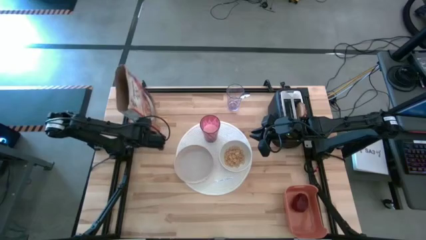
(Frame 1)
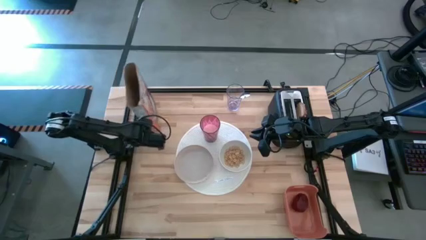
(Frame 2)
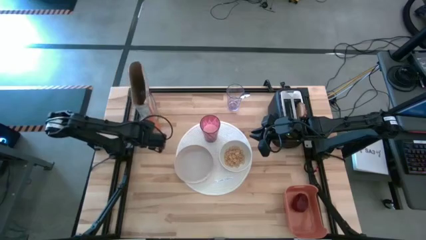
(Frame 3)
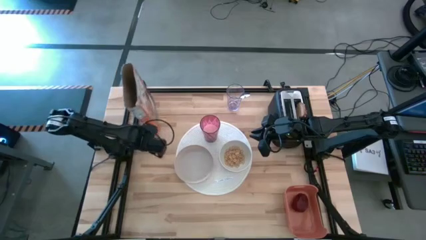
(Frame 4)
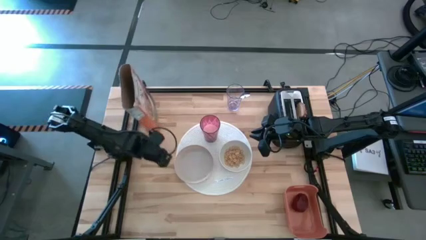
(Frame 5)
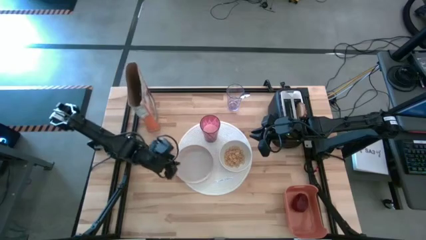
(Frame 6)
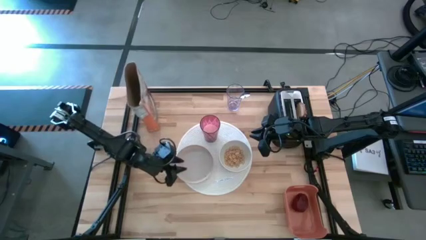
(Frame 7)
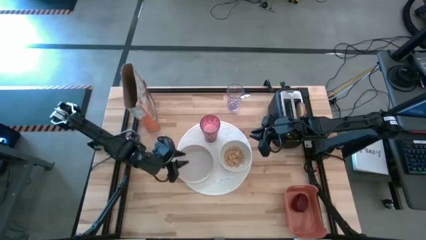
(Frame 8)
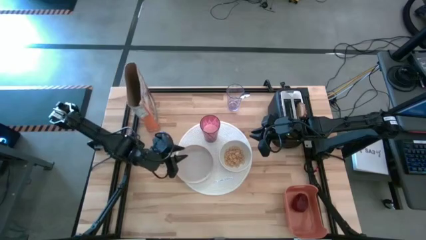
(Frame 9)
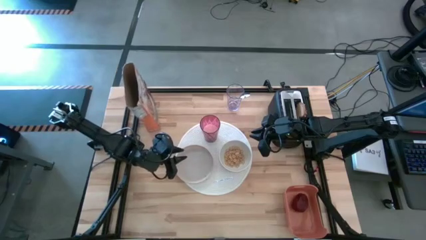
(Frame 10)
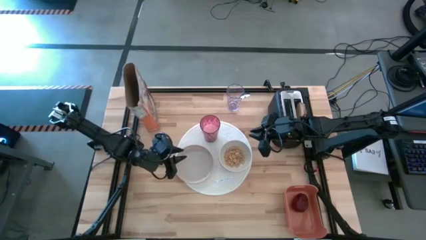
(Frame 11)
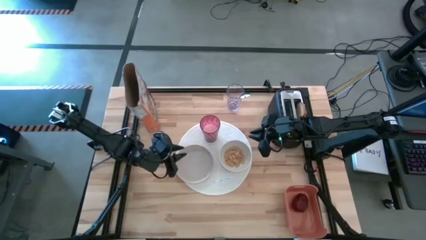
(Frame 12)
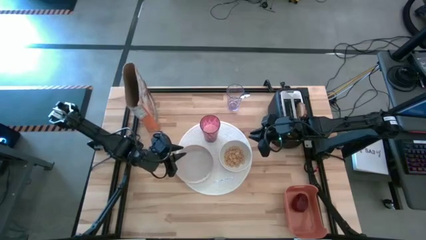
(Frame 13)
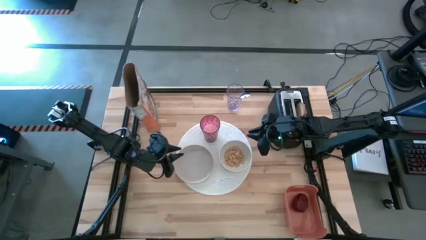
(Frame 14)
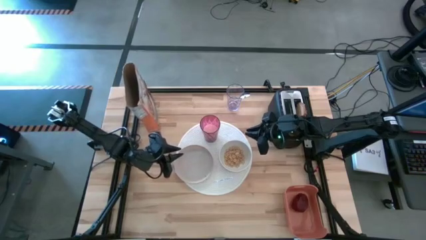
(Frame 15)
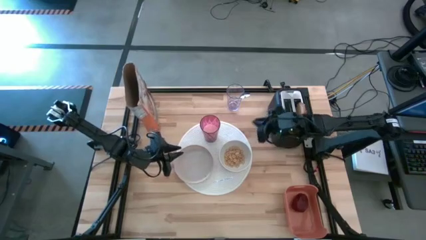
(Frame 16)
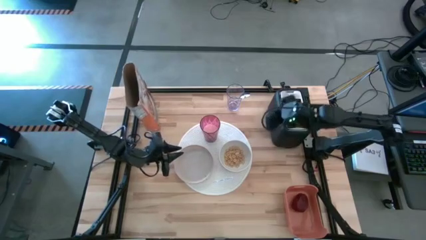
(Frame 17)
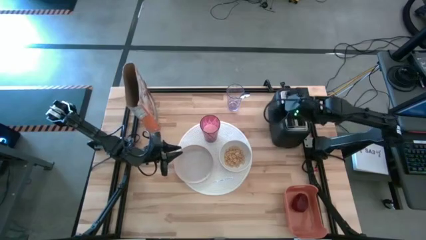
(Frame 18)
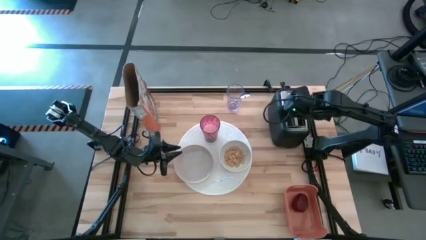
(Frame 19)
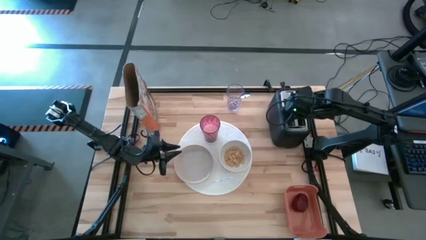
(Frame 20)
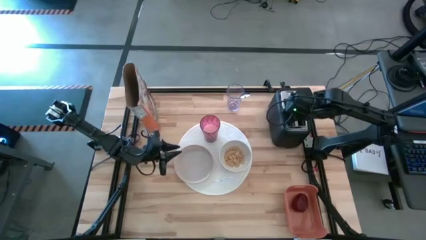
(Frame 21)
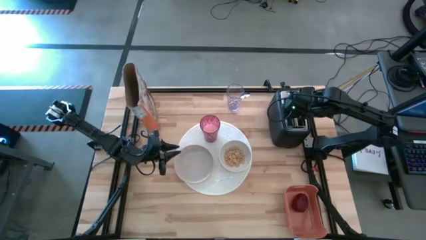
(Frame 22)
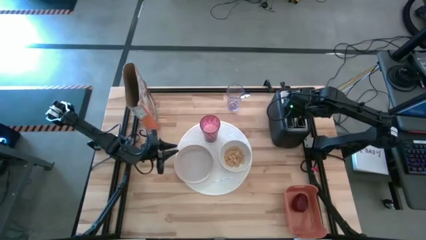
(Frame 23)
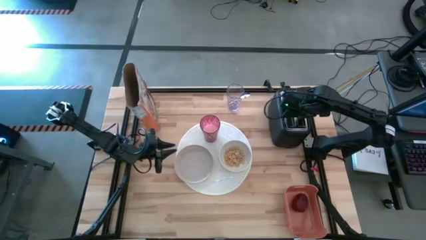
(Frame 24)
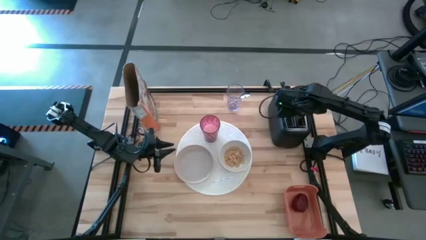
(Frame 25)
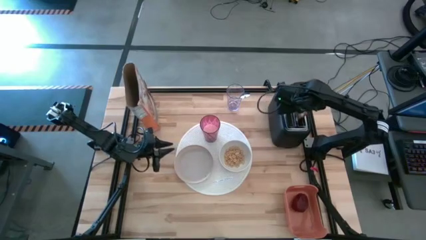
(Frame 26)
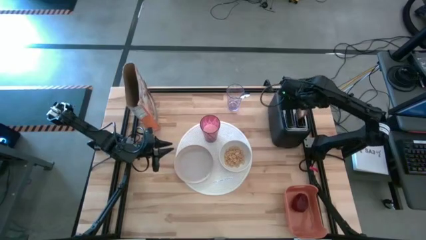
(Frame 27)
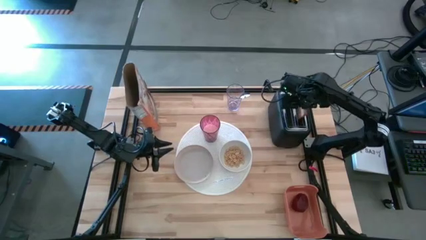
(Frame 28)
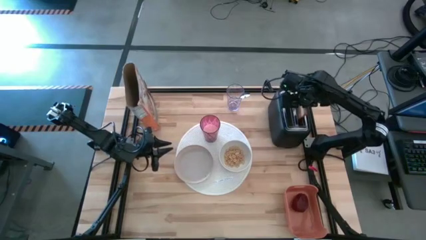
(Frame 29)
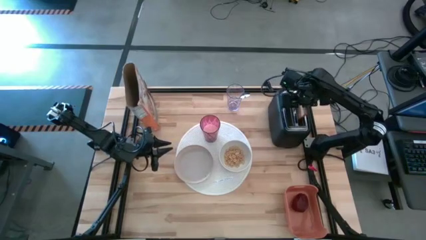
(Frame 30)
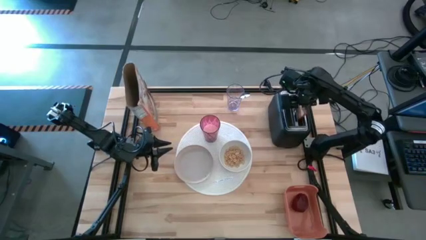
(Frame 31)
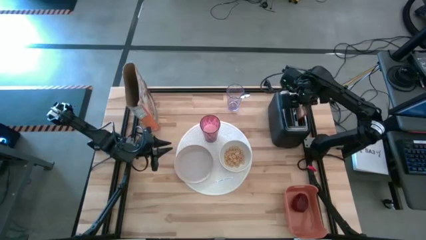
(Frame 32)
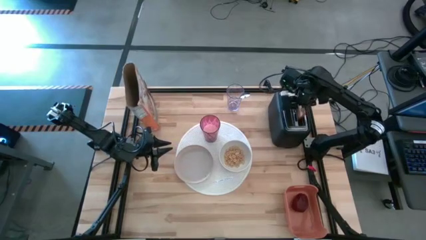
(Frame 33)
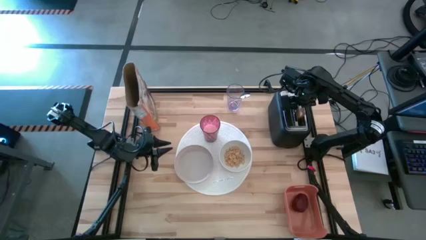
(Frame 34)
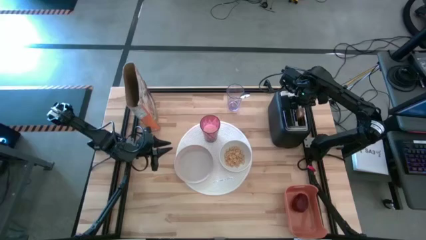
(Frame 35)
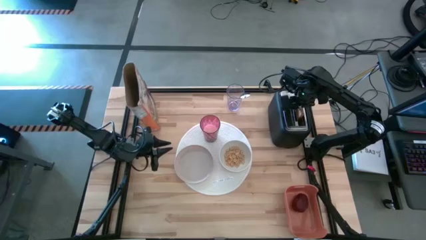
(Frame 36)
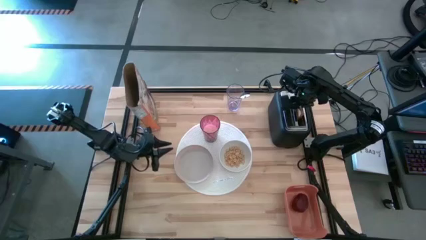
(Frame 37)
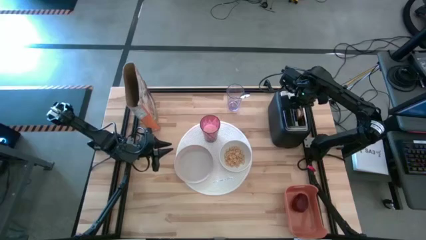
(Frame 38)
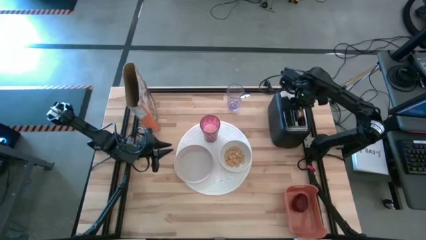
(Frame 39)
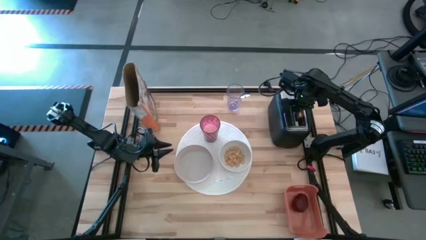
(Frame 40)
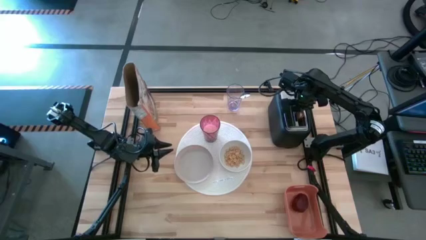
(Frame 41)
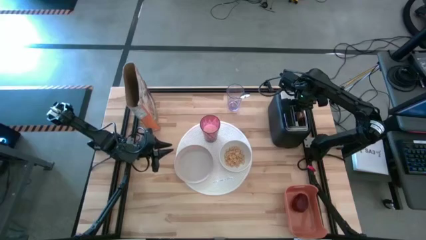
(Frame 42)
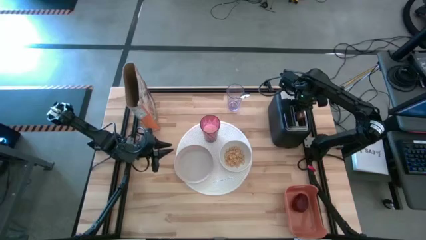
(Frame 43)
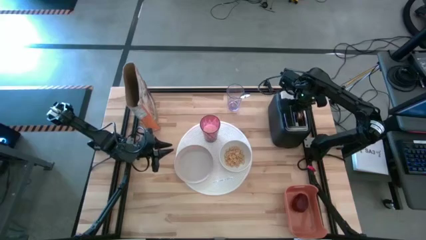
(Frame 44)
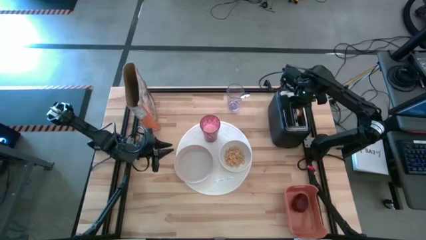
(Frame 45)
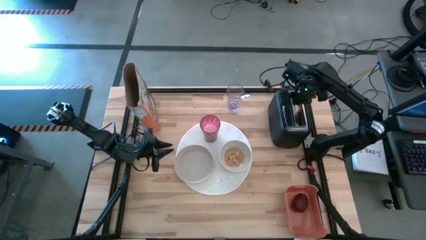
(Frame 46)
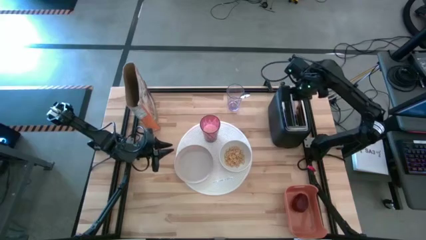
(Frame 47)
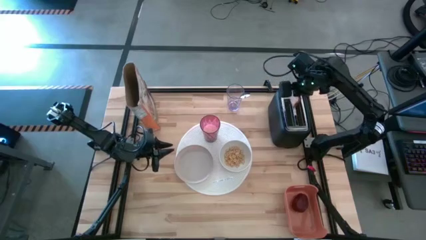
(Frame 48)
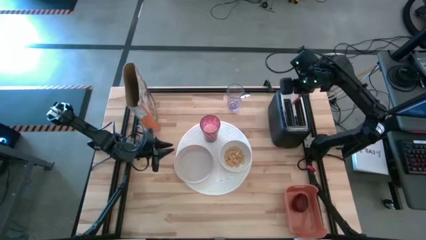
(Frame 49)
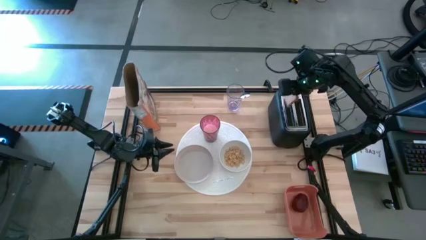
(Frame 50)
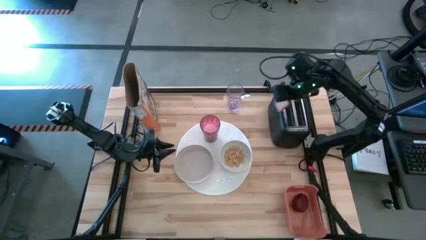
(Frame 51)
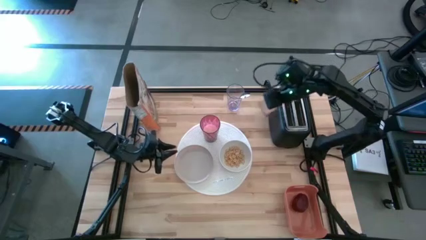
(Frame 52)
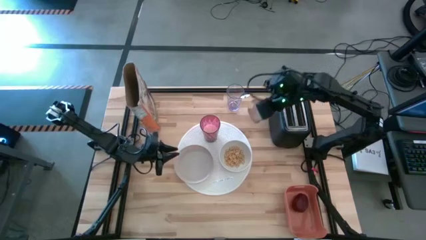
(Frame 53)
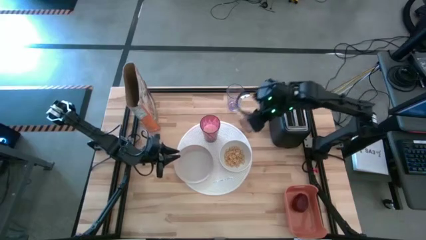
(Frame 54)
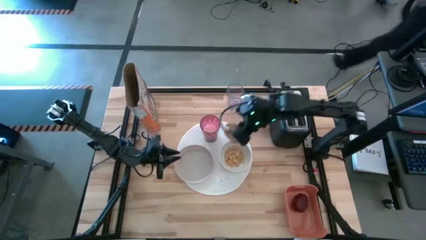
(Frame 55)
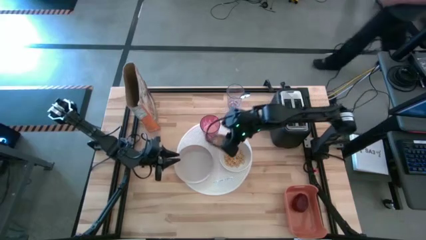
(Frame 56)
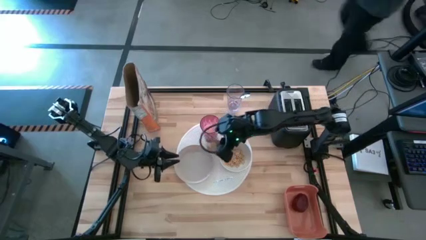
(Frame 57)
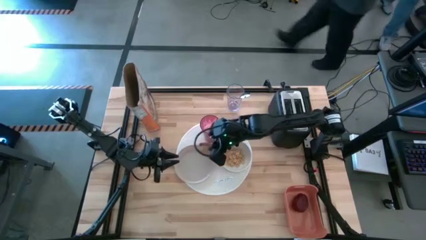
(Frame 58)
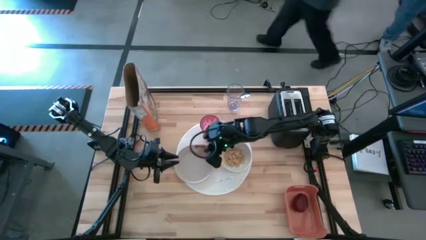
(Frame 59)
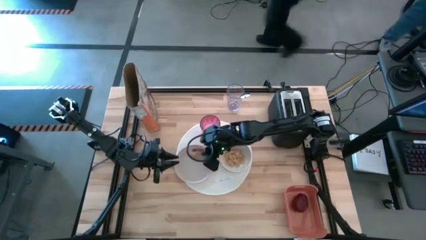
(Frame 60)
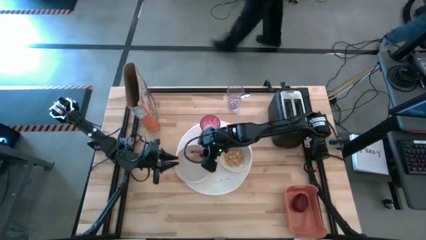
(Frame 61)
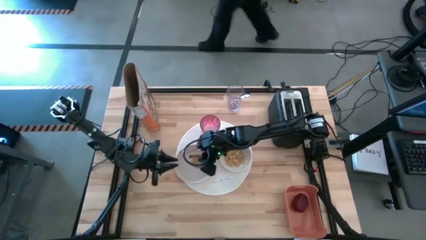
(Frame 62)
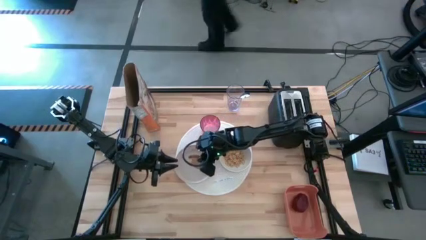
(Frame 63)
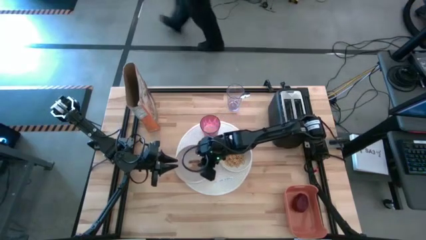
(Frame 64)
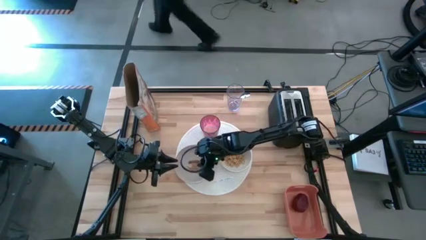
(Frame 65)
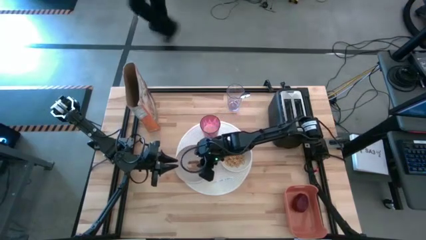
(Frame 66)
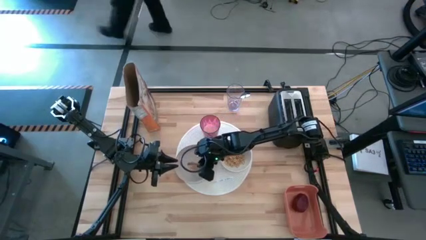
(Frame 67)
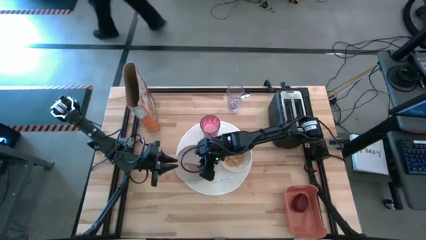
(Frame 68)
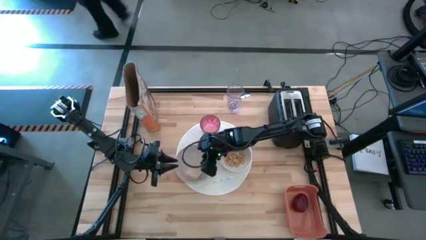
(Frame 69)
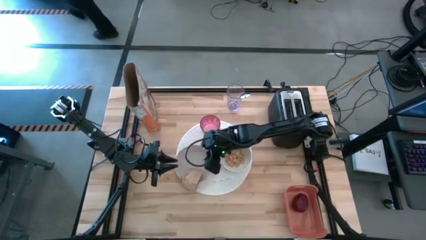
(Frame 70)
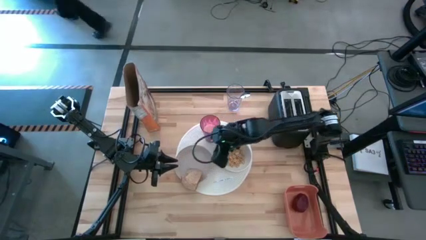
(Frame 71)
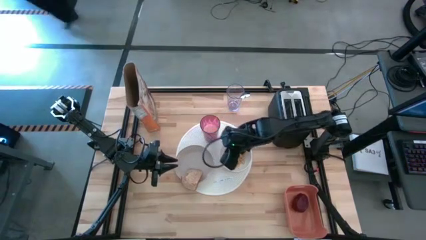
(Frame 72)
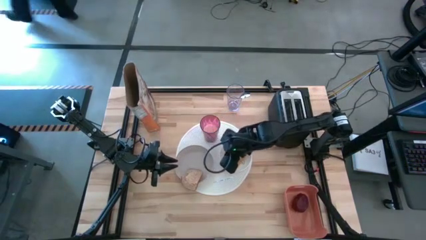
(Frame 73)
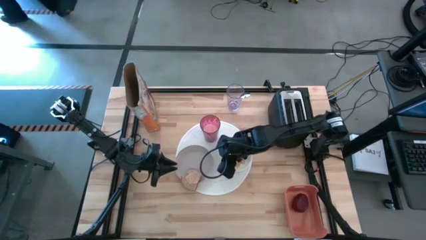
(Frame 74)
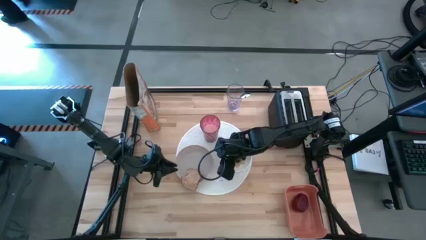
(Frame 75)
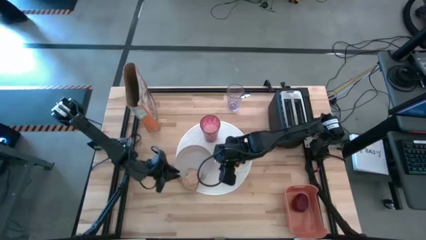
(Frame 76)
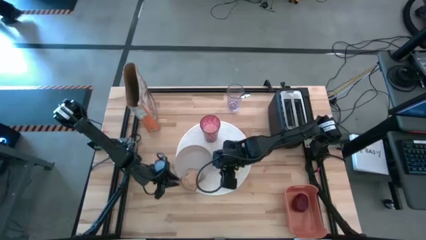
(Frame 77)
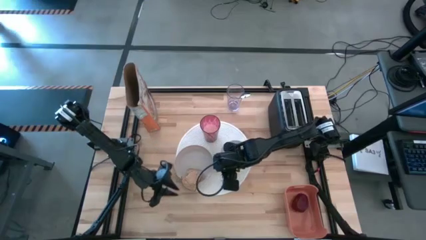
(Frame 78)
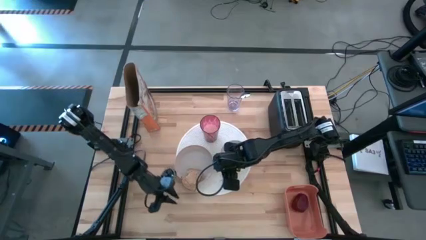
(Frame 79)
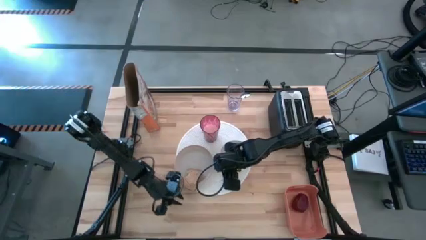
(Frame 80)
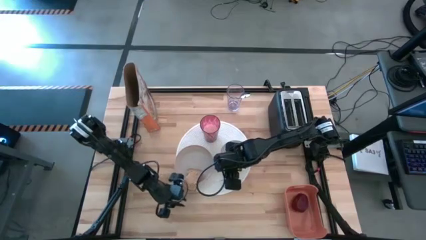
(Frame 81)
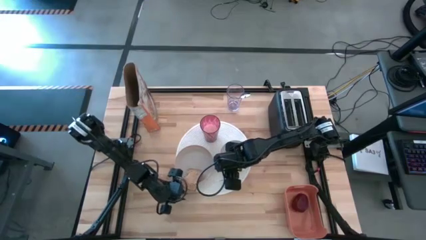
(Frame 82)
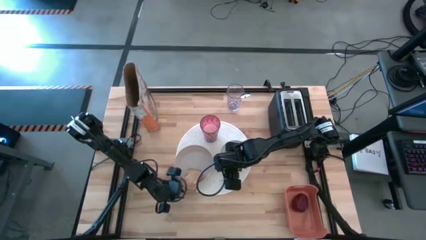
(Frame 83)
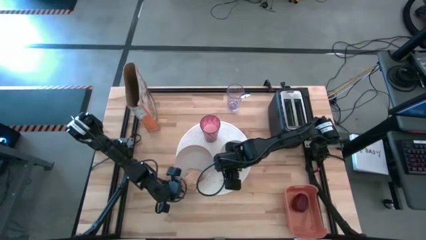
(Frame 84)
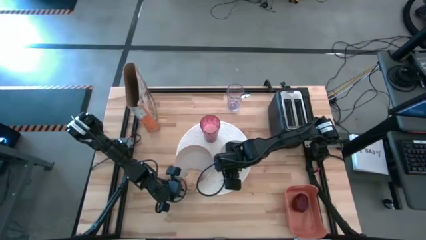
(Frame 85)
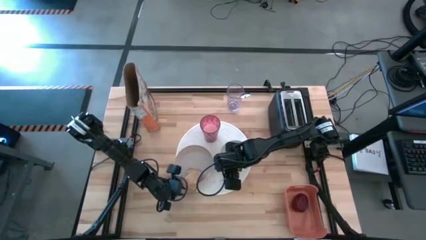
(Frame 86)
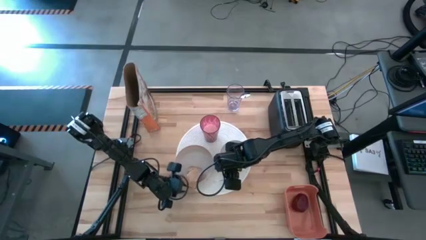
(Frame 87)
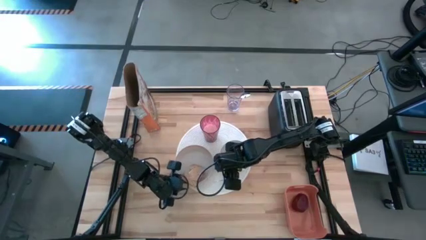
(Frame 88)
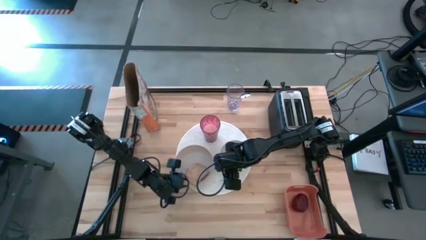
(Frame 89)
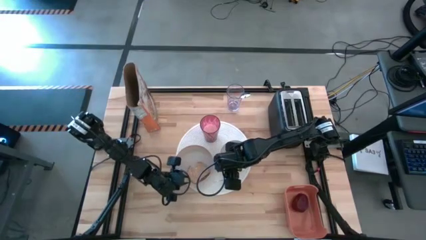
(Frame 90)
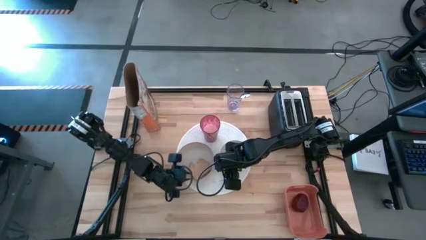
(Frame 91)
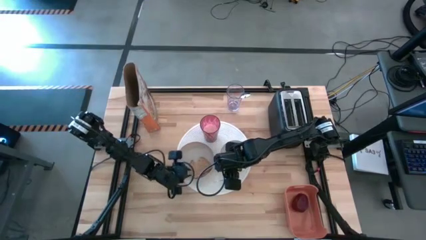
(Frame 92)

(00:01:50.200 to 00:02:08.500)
Task: Arrange a breakfast setting
Put the brown bread on the gray plate
